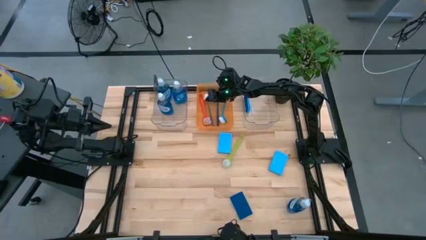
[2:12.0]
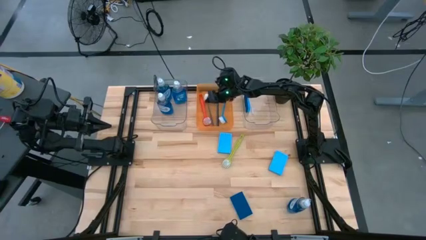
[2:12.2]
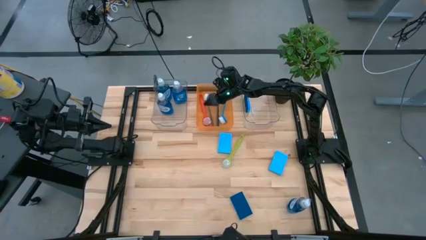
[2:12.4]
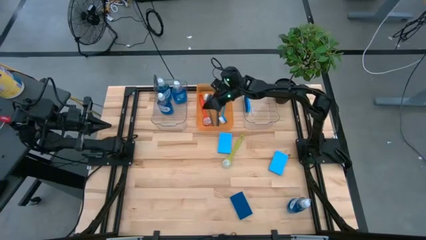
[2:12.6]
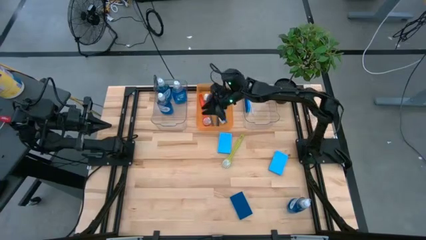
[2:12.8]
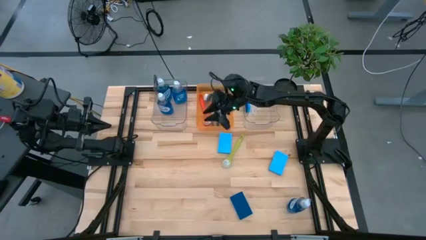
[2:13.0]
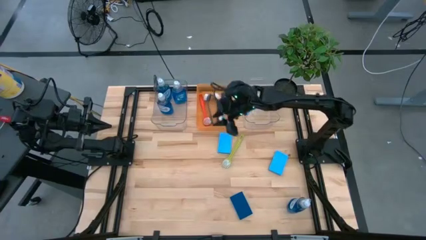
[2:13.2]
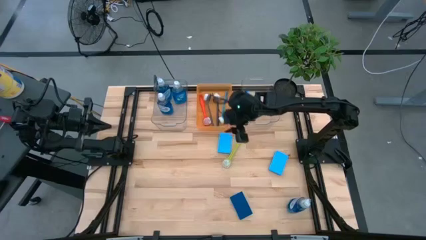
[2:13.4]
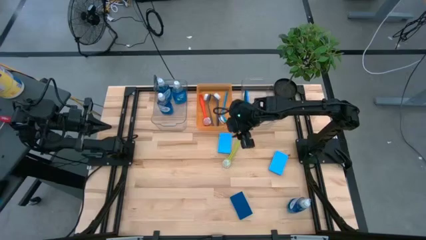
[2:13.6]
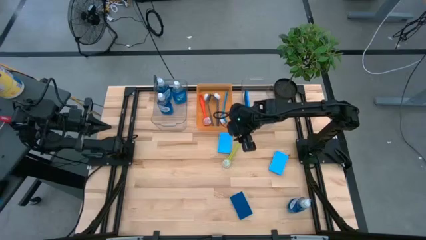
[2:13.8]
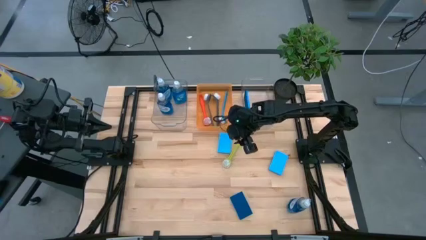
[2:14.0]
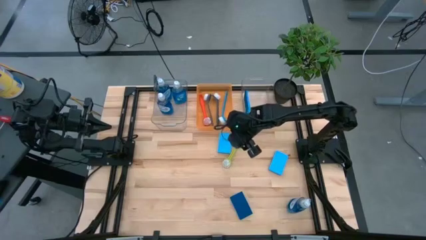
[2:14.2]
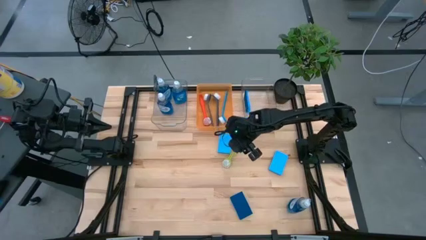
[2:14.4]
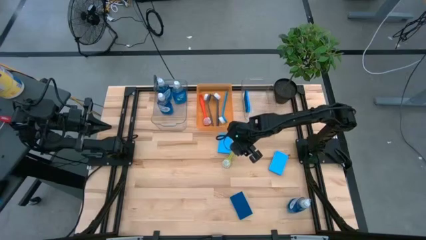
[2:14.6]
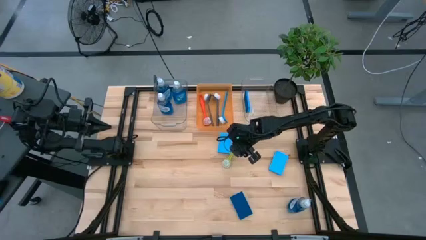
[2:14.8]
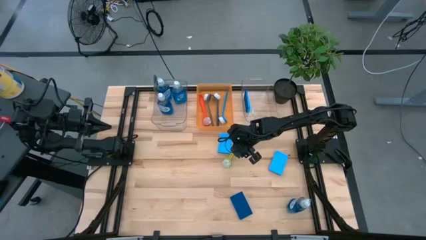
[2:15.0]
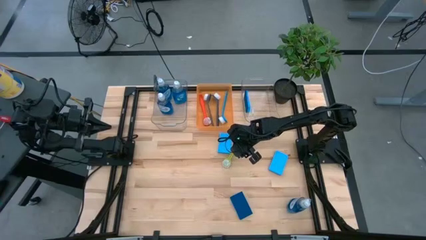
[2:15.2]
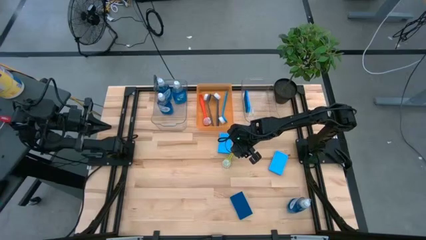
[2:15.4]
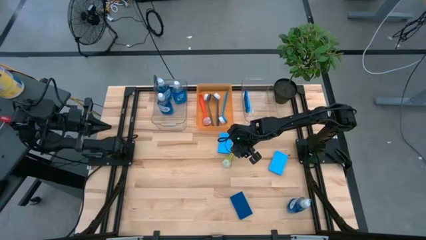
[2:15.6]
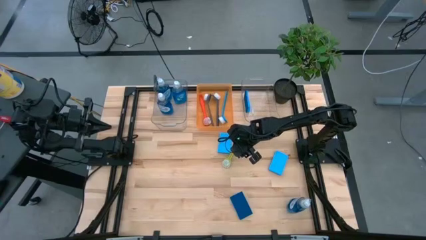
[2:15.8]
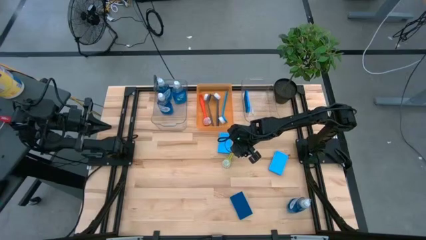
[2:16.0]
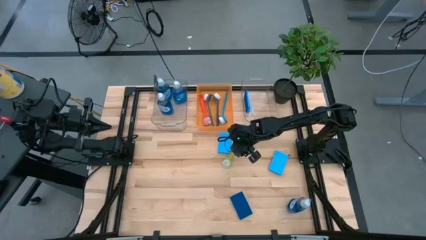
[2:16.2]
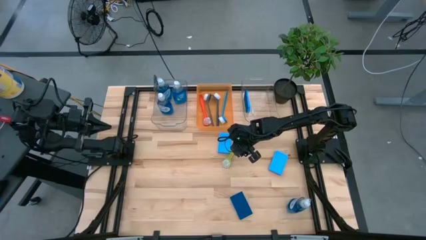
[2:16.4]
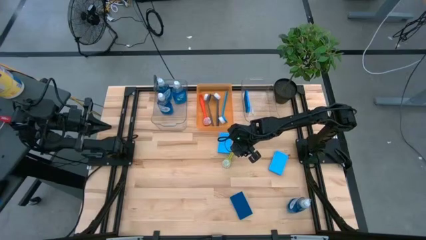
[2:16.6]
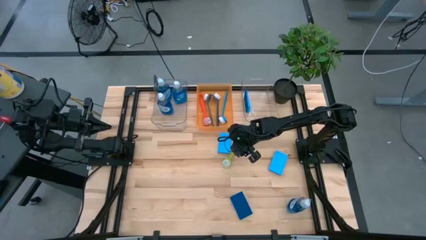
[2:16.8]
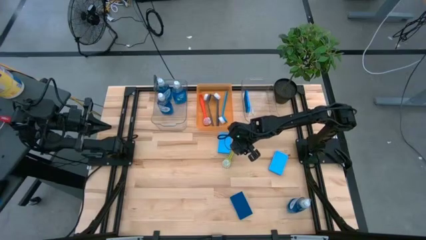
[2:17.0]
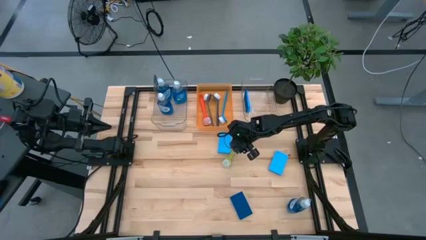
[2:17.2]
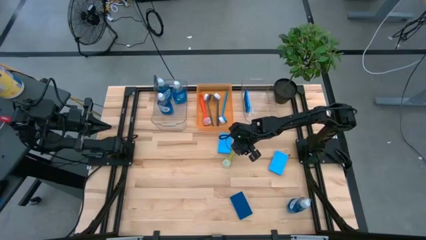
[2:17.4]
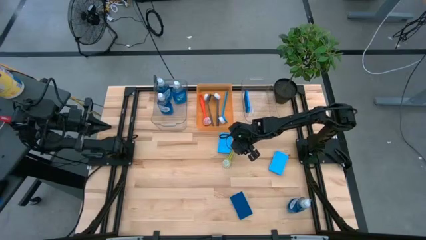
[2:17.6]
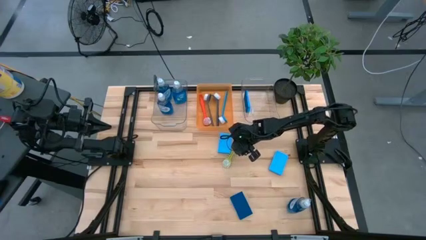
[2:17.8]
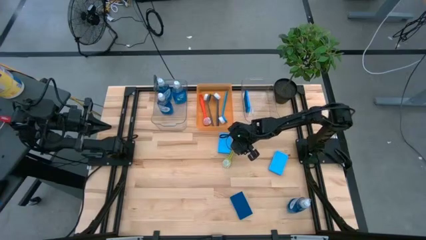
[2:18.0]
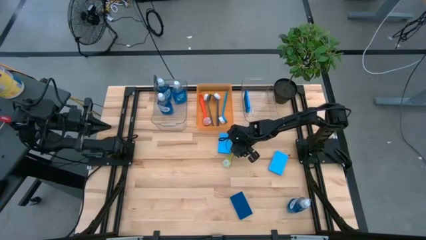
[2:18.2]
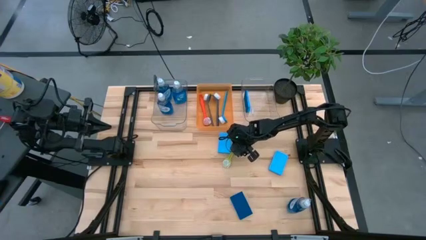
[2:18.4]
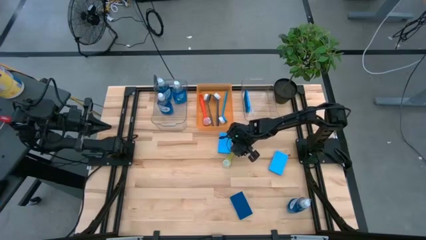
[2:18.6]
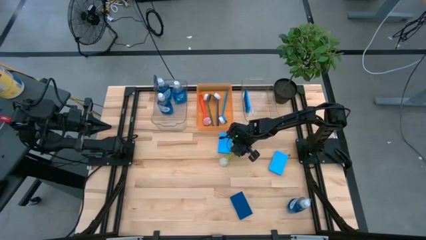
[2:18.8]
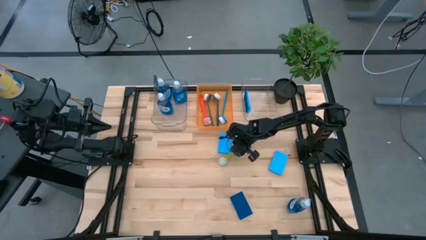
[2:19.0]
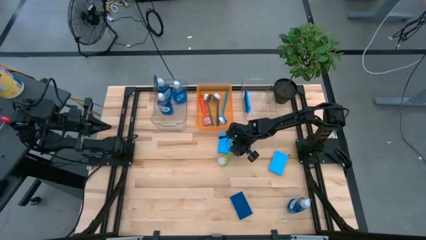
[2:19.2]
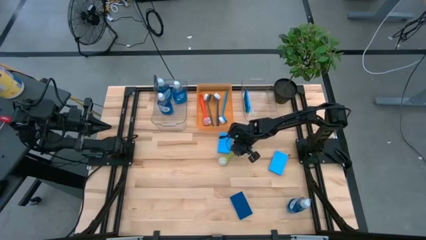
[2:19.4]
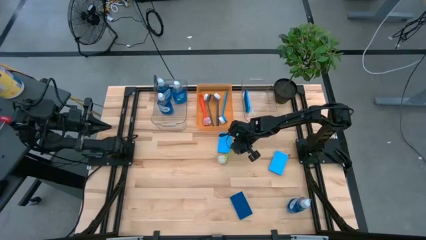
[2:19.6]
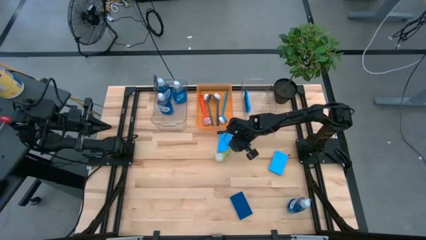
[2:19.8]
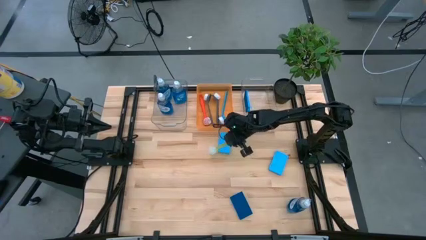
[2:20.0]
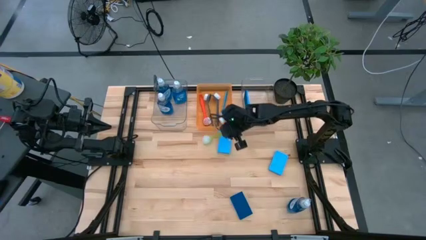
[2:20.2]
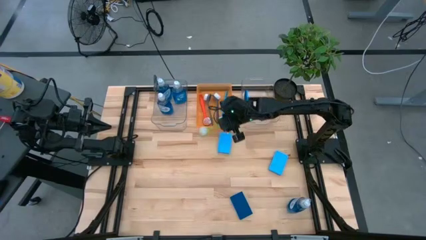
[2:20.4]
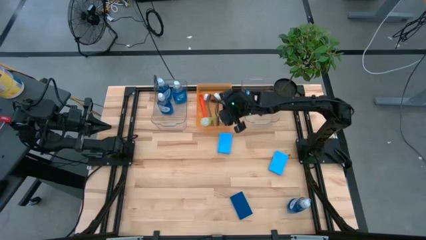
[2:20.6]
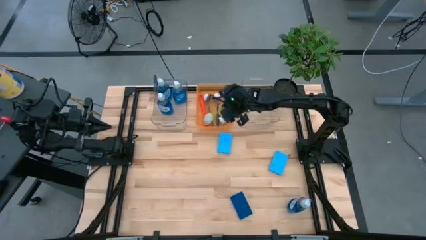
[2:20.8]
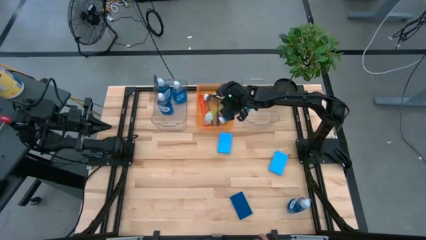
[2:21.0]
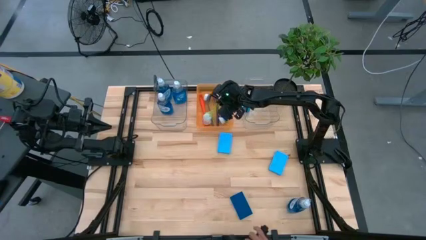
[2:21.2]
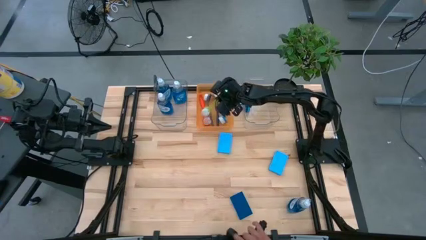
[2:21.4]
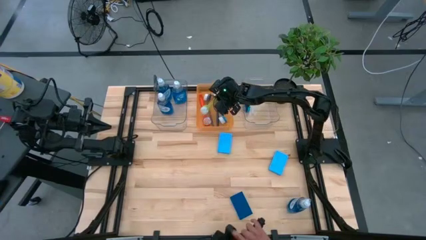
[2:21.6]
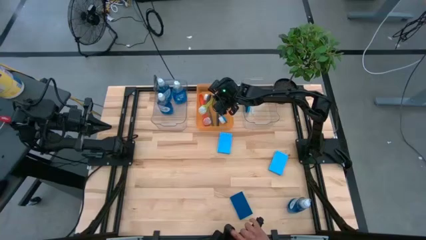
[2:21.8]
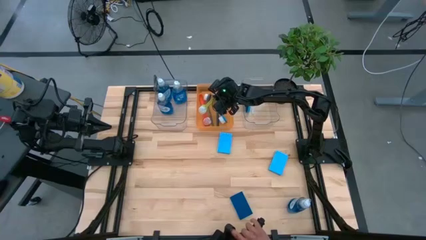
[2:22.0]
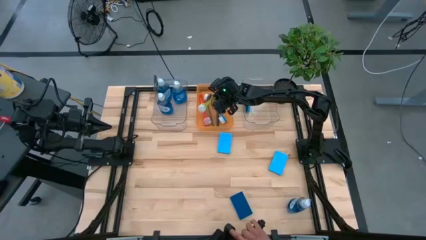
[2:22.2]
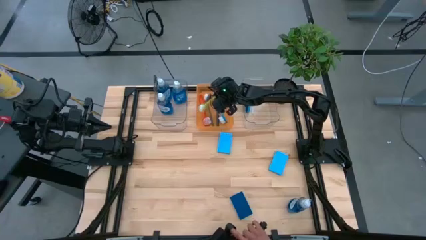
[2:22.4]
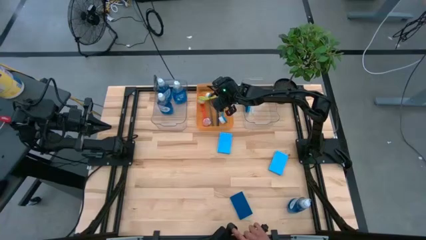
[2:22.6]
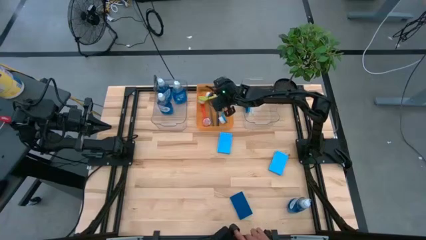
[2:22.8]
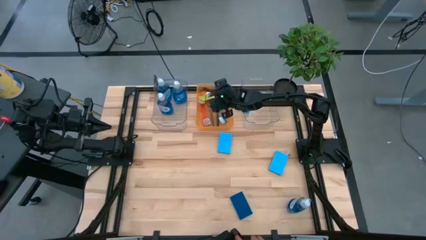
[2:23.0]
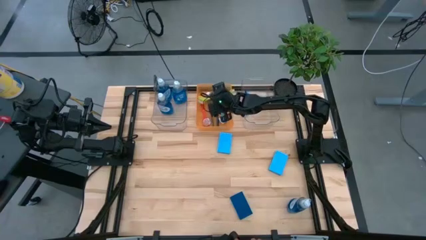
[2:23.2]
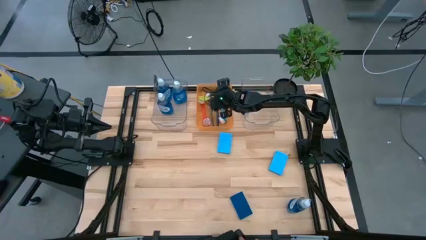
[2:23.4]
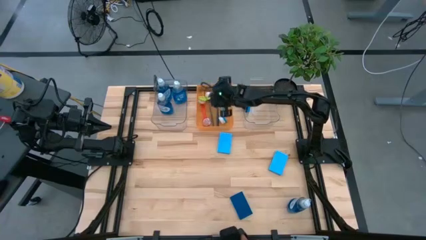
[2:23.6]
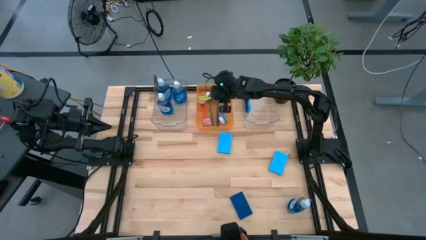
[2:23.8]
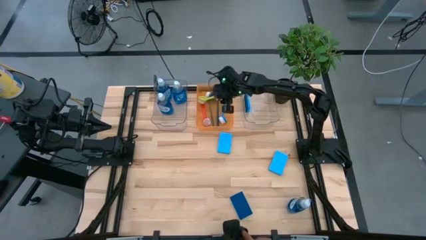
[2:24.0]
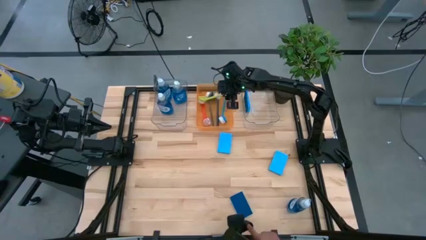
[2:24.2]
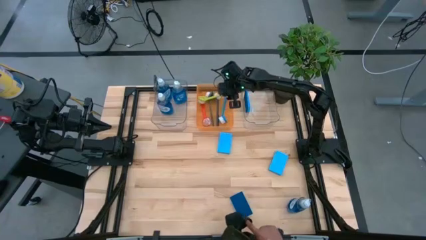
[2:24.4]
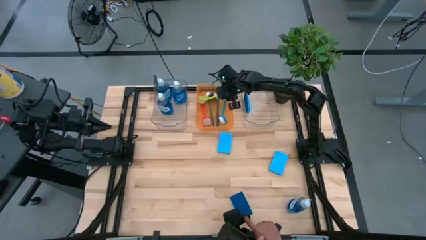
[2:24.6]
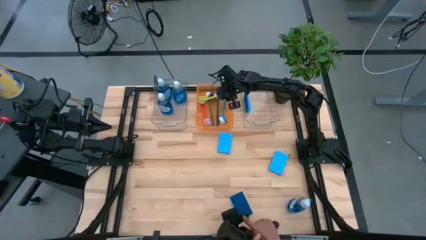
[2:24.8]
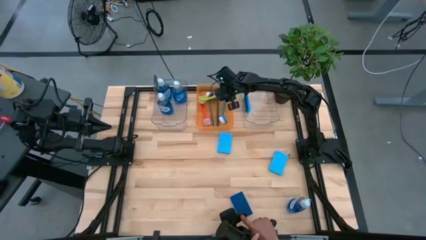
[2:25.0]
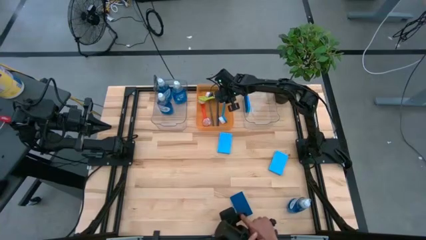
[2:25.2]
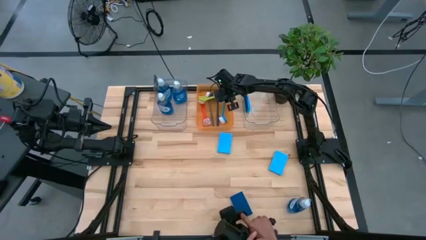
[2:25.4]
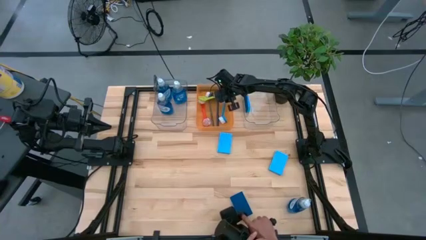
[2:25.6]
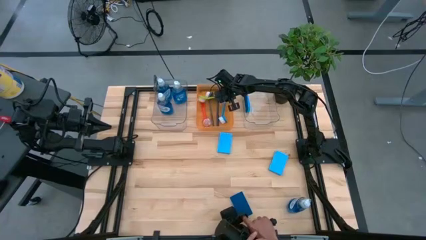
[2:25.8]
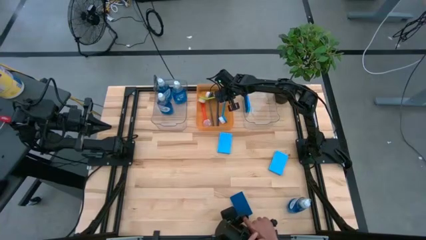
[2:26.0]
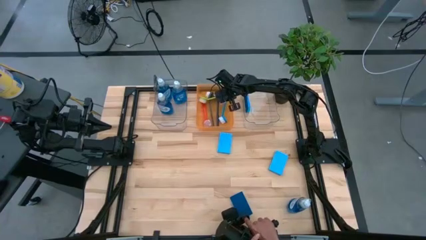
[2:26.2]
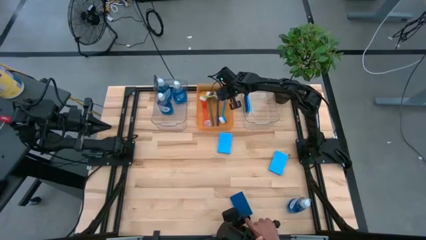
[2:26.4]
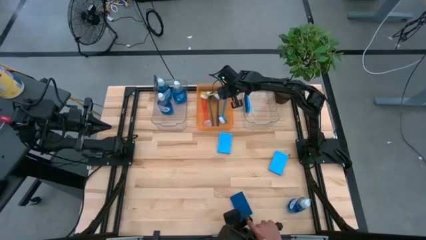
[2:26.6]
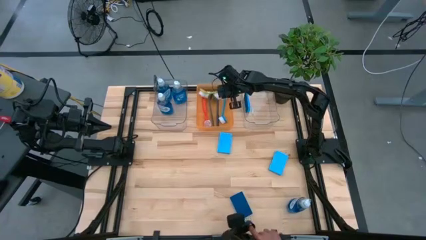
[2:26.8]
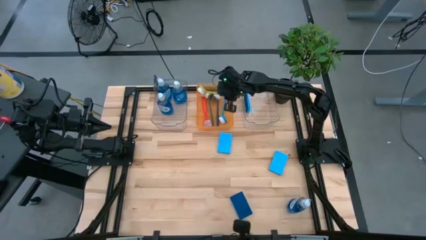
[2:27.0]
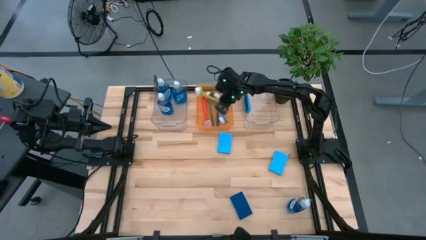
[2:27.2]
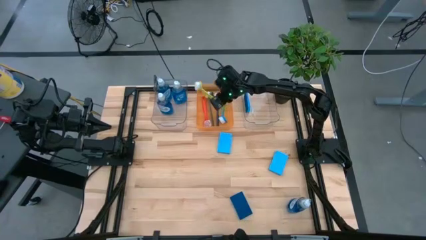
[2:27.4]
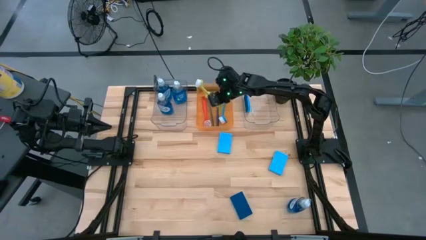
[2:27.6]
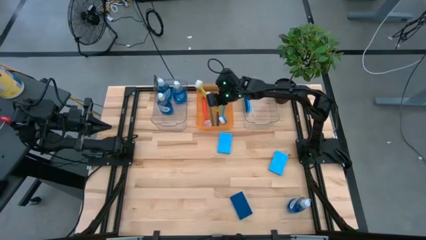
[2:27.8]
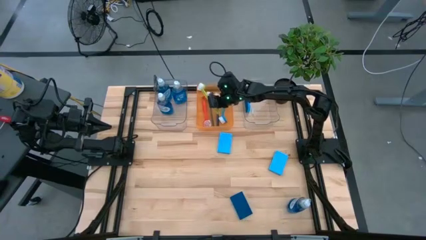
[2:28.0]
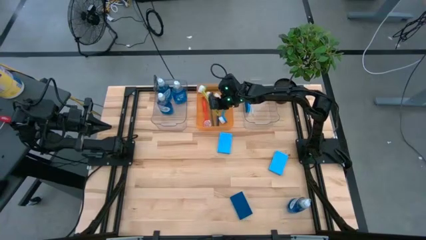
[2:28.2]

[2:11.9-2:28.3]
Task: Pick & Place Kitchen Sink Supplies
Put the green dish brush into the orange bin
